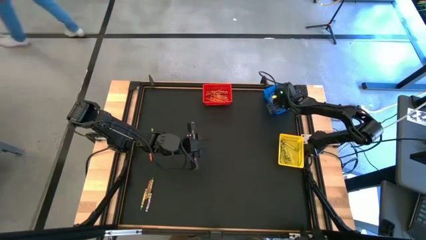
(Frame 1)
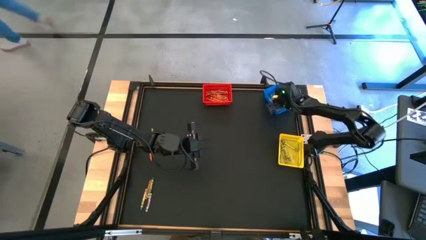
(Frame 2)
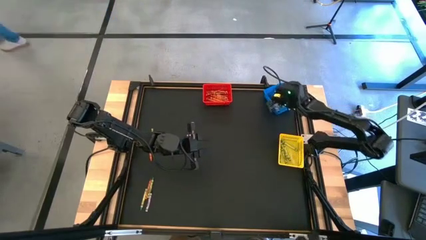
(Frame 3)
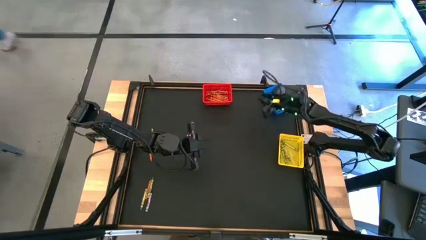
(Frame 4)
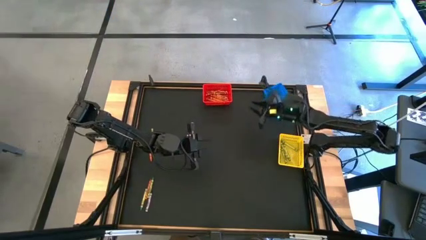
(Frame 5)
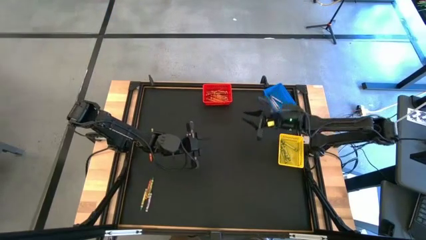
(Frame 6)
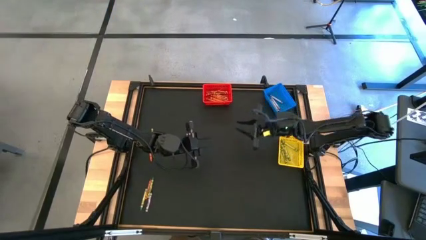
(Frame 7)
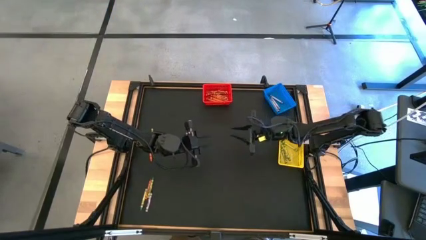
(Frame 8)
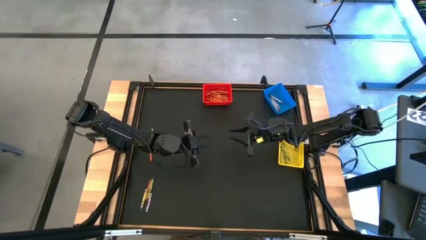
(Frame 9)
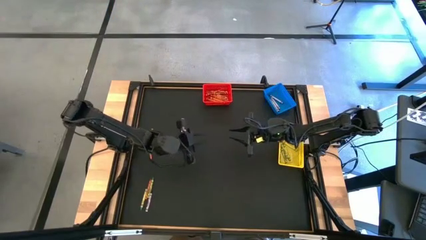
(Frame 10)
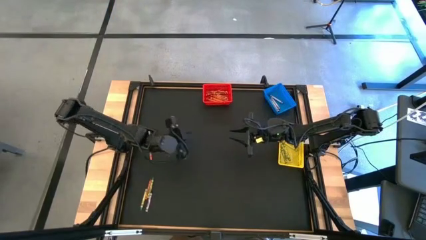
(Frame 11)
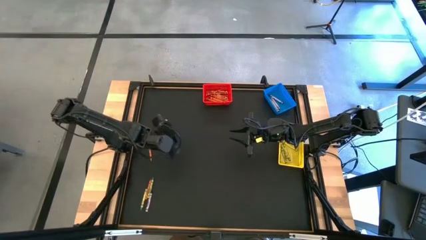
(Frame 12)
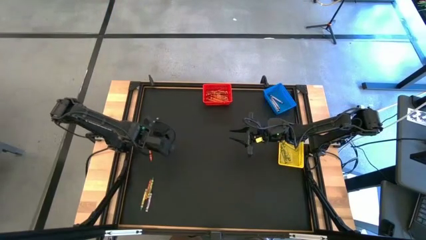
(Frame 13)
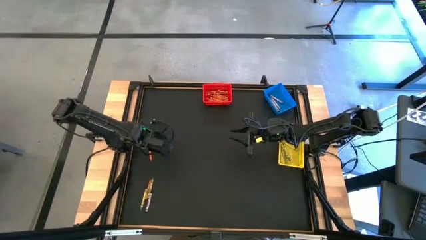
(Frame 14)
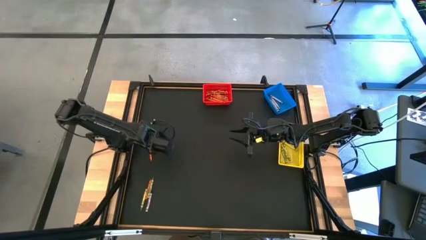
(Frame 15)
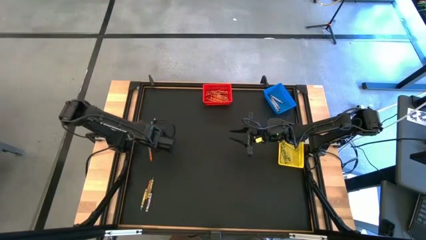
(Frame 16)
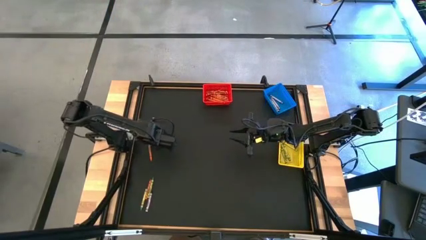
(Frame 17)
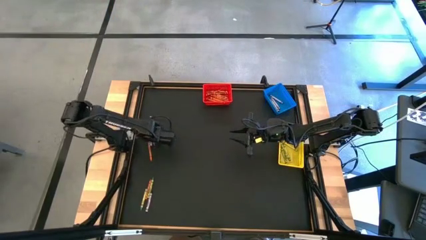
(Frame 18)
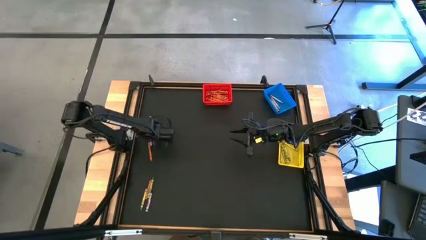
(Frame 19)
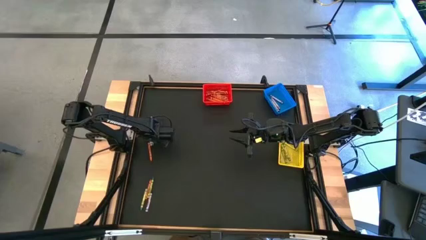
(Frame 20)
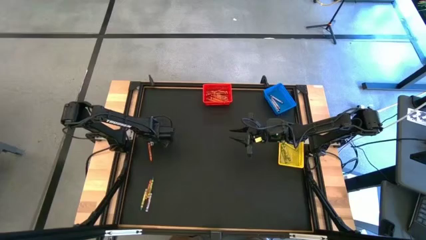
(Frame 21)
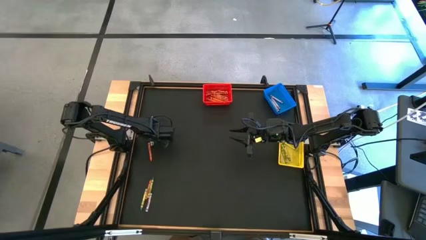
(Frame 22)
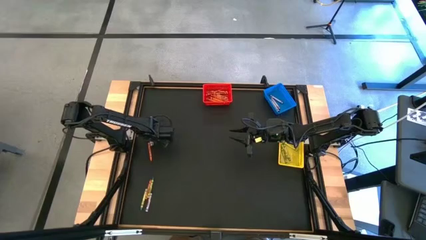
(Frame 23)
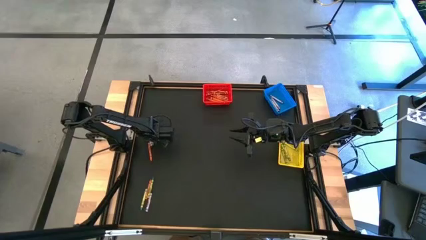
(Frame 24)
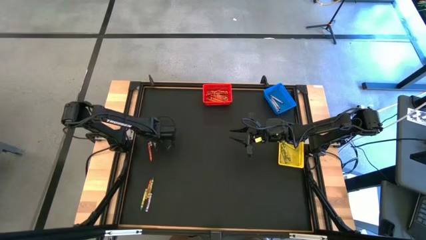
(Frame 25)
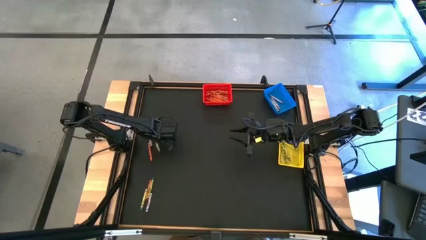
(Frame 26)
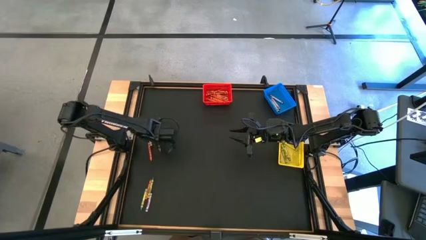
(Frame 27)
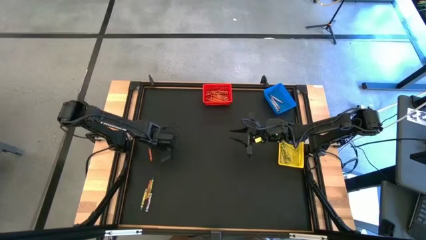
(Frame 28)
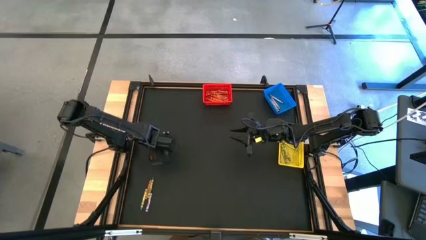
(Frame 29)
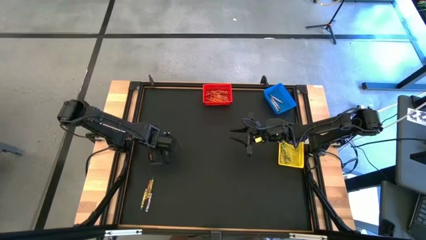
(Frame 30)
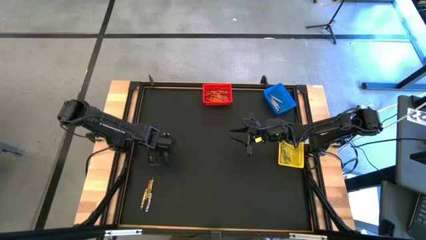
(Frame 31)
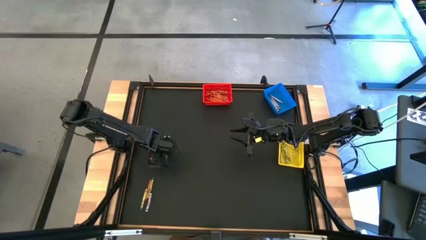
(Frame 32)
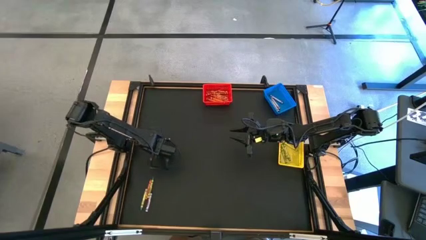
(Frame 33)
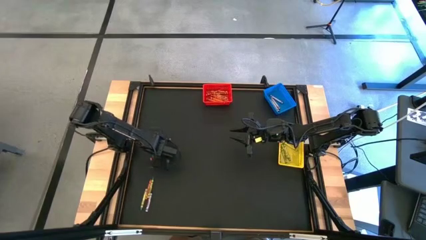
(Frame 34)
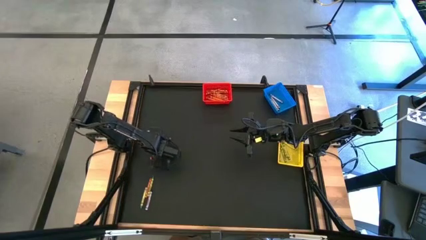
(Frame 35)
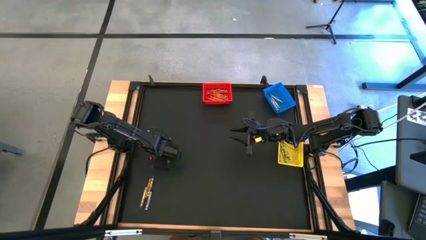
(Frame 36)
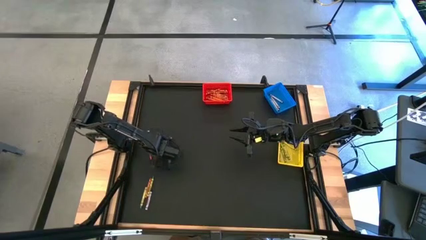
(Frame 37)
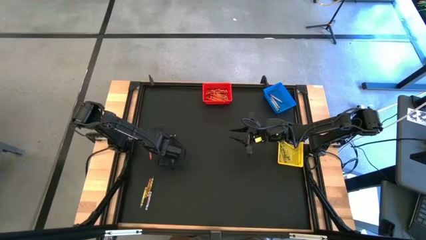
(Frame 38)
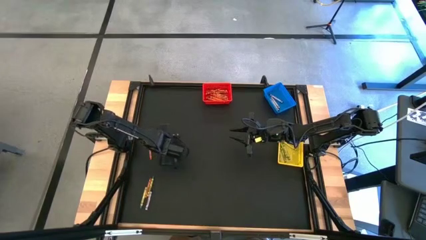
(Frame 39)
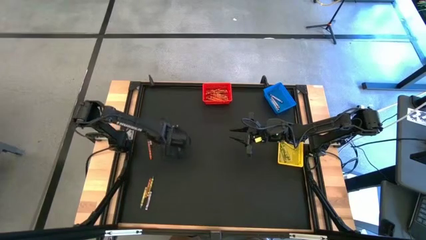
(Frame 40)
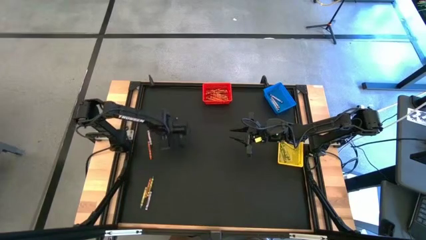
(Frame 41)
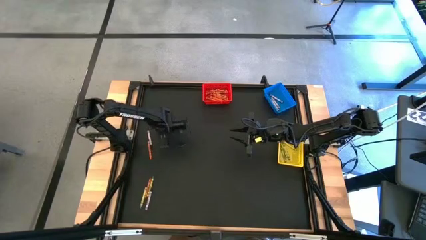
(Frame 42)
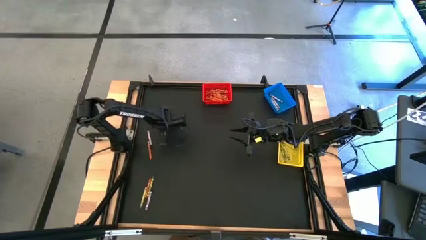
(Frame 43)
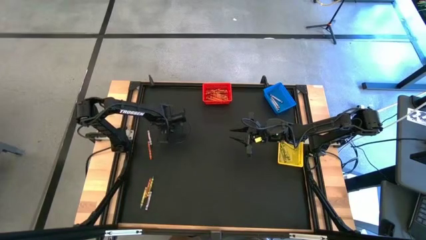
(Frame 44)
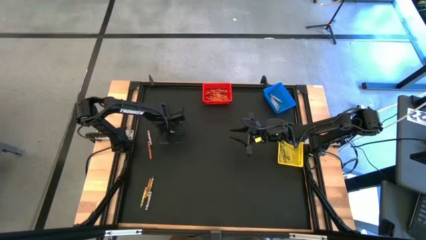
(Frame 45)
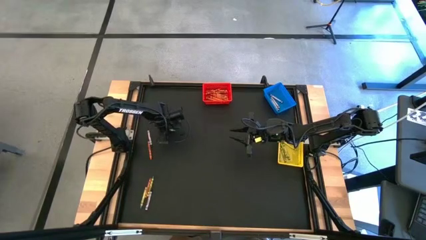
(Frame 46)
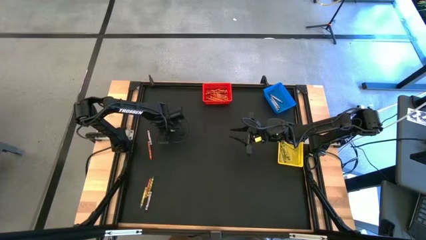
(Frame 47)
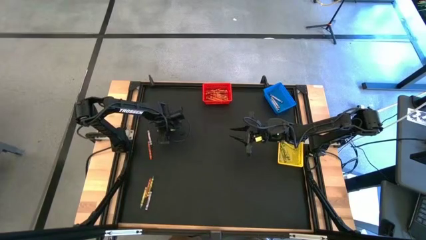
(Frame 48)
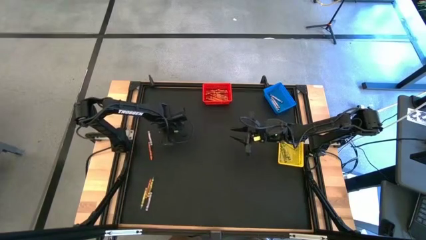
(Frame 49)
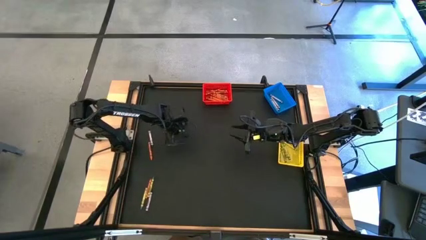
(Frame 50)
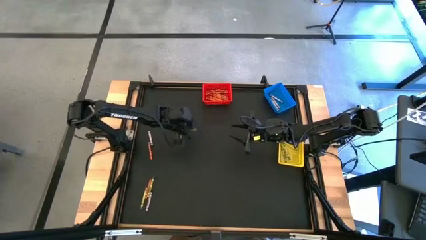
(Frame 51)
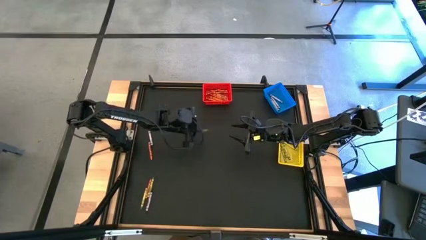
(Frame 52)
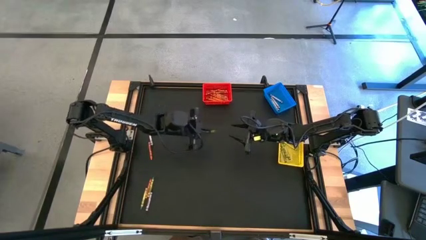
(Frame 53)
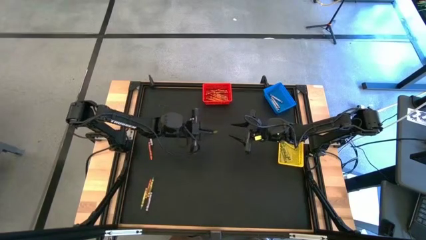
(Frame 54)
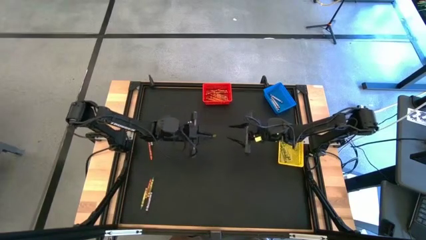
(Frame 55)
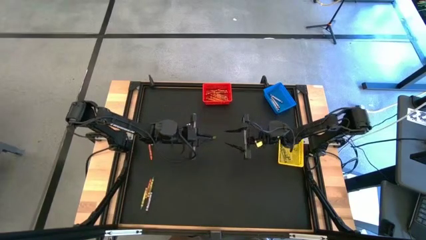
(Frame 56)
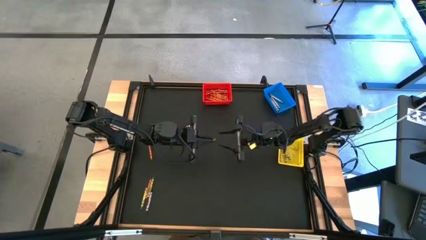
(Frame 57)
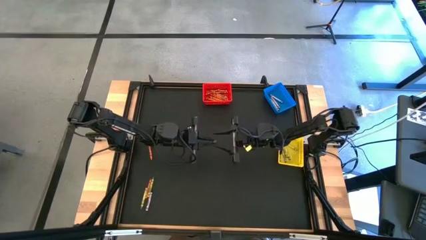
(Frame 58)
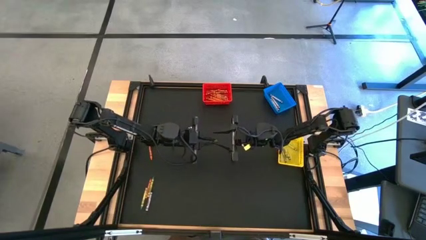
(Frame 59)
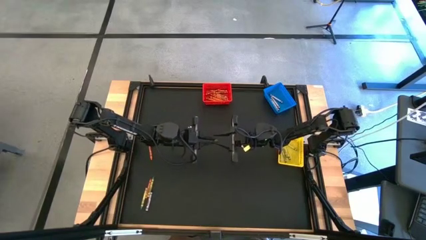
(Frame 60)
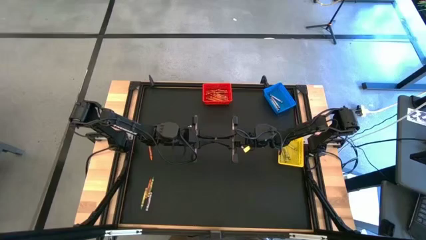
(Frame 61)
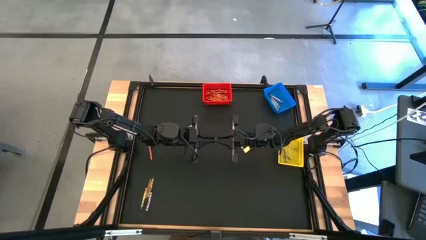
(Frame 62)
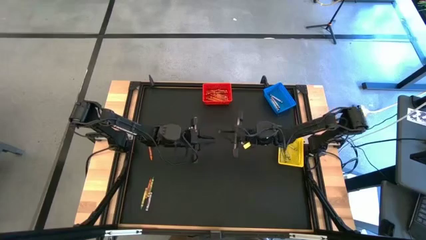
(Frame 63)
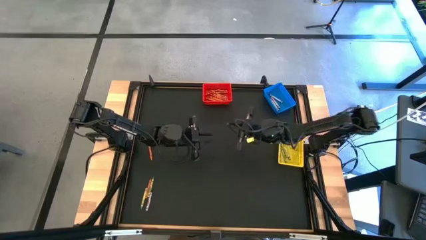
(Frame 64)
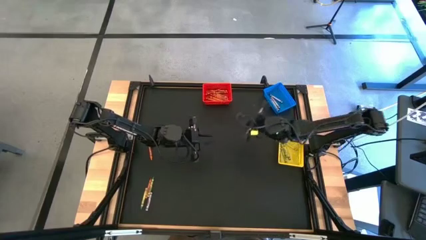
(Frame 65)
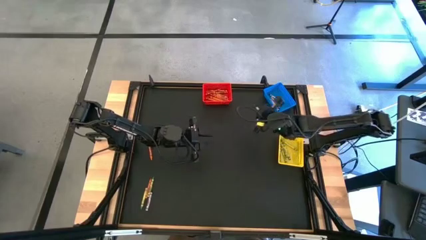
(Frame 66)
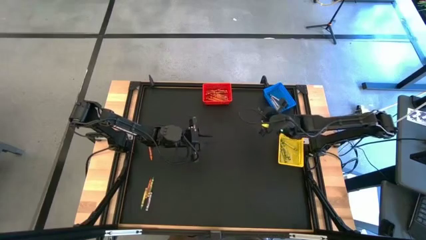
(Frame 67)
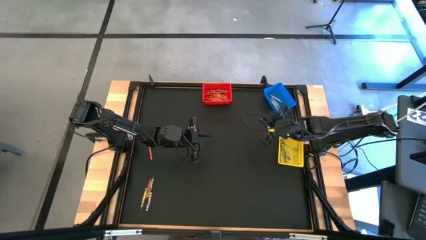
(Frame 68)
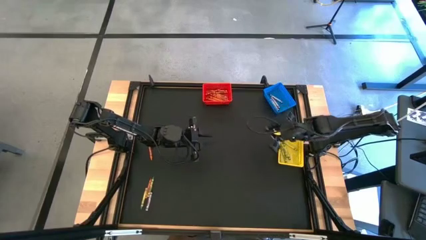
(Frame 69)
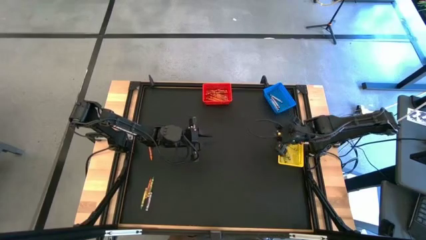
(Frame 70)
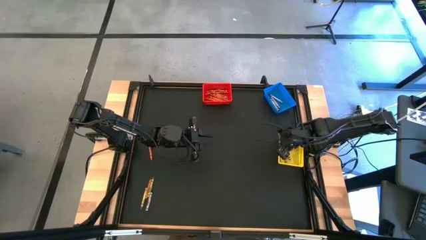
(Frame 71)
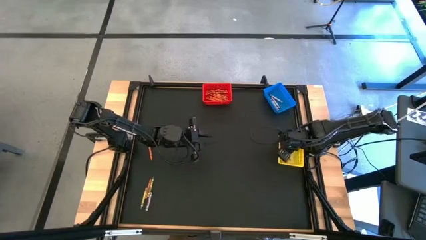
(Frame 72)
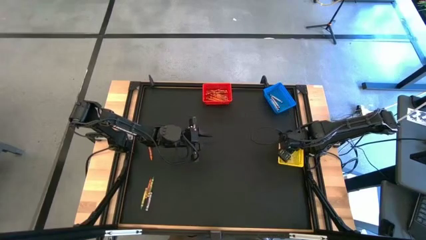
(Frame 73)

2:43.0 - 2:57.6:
Task: Sort crayons
Put the green crayon into the yellow bin

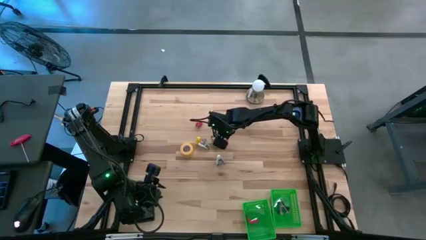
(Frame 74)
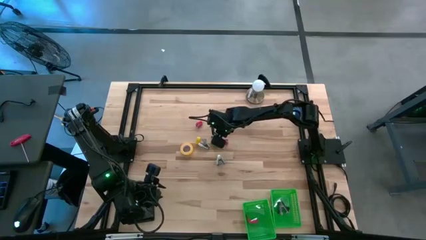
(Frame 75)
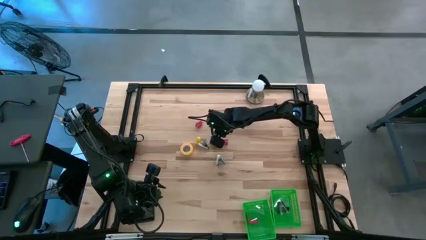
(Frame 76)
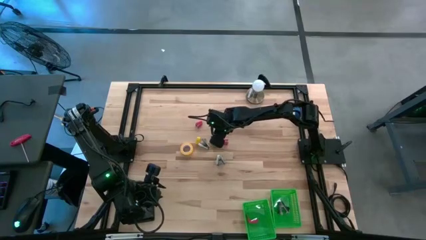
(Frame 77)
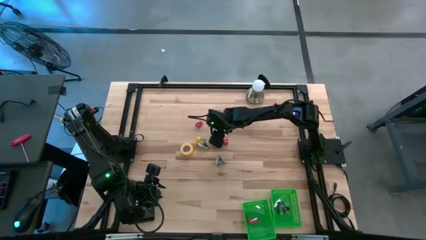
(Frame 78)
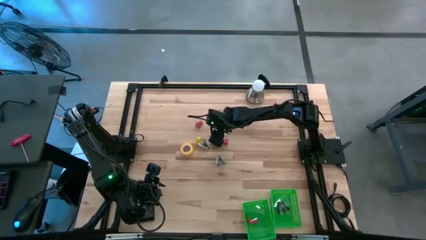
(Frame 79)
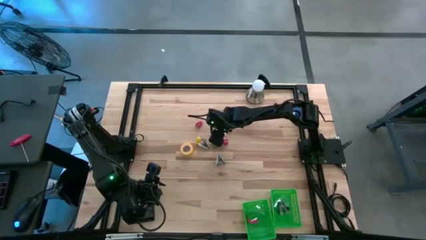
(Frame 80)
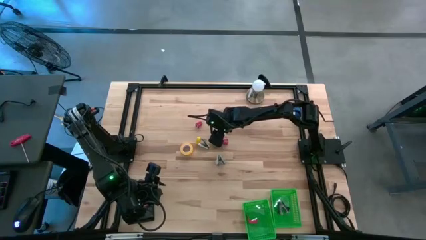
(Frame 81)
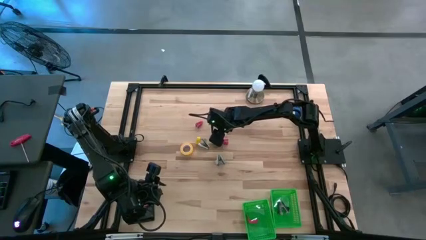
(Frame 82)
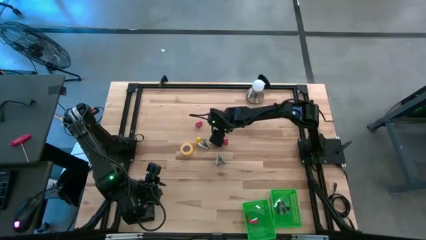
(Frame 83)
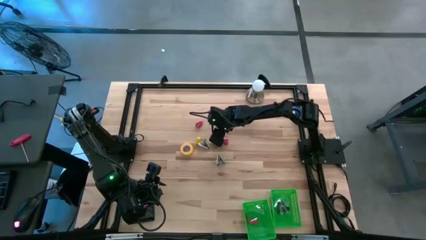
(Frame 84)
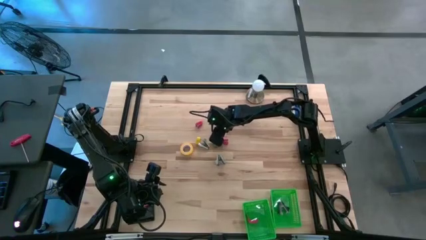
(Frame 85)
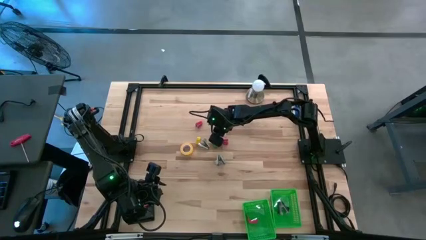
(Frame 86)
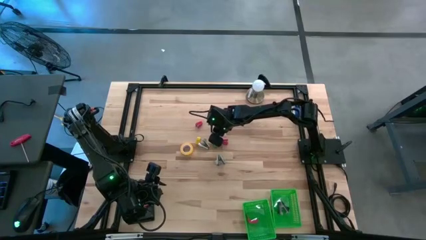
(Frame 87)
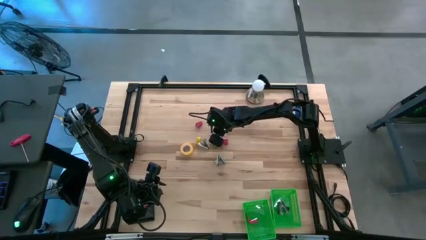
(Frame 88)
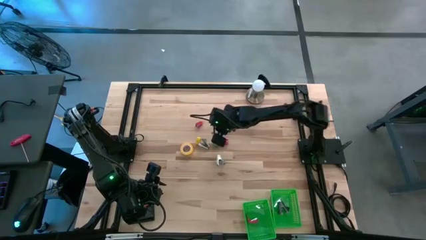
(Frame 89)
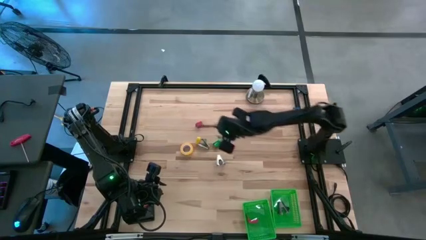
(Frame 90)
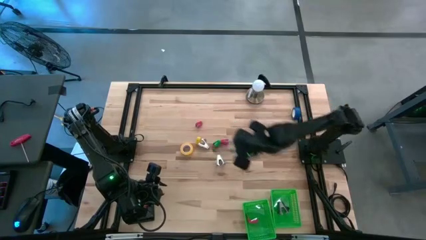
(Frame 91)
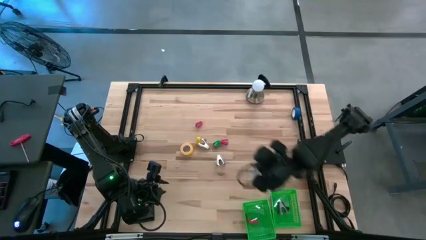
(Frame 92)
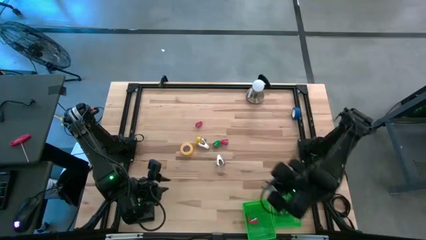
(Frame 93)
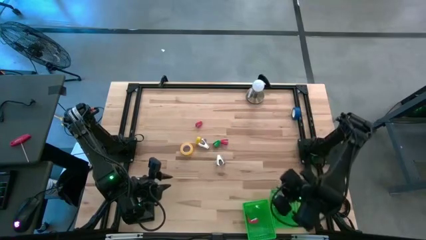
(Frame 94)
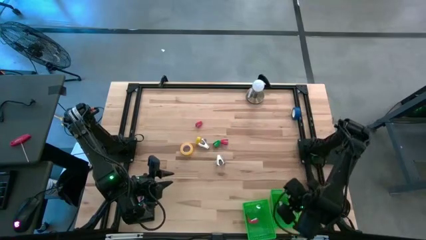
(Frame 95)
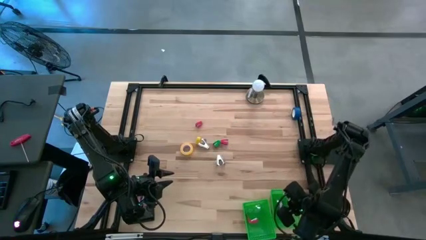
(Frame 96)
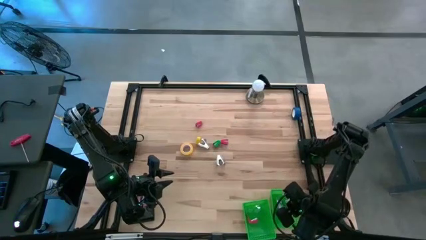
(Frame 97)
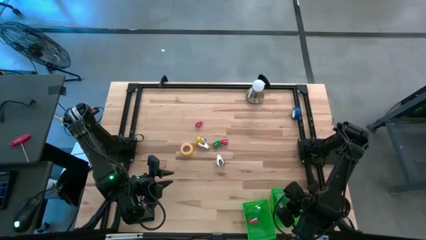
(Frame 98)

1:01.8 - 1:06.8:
Task: Pick and place Stapler, Stapler remover, tape
Put the blue staple remover into the right green bin
